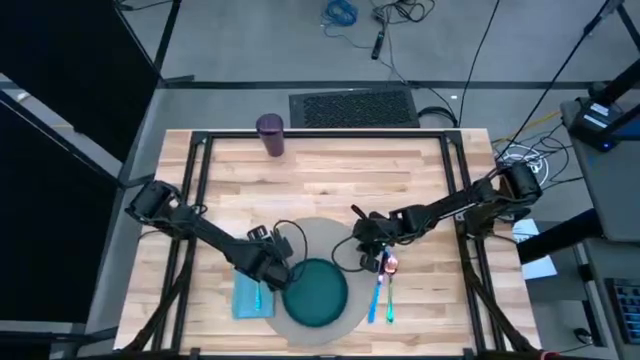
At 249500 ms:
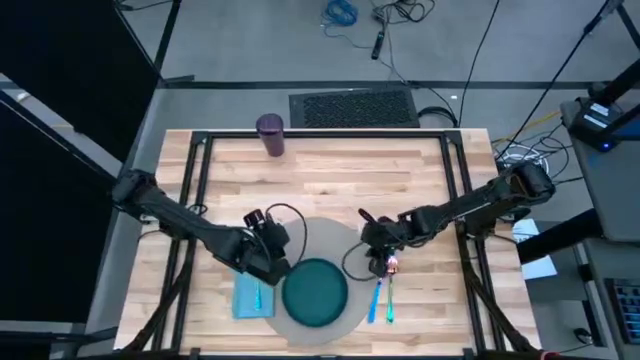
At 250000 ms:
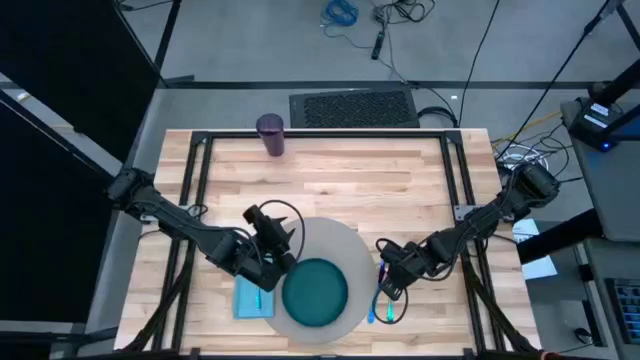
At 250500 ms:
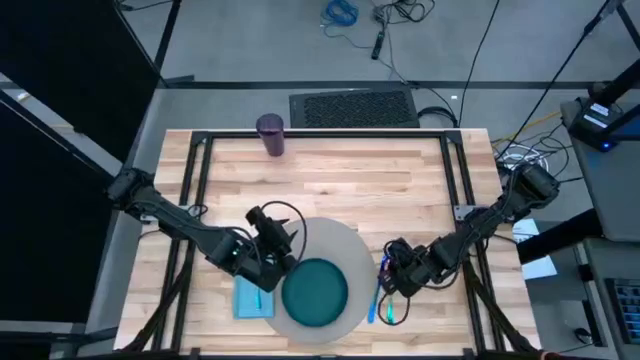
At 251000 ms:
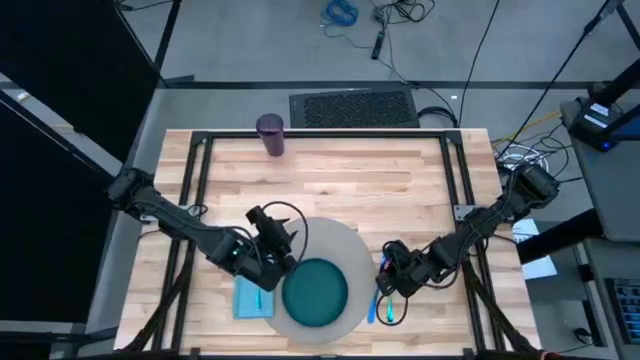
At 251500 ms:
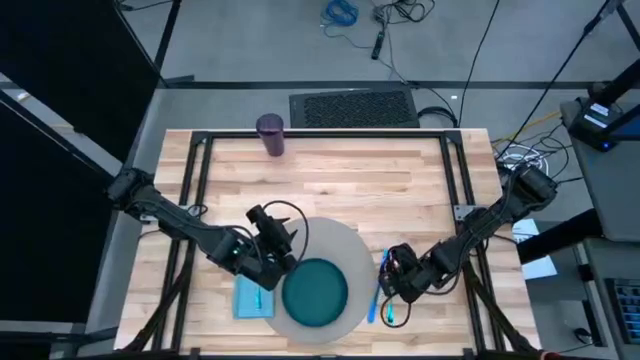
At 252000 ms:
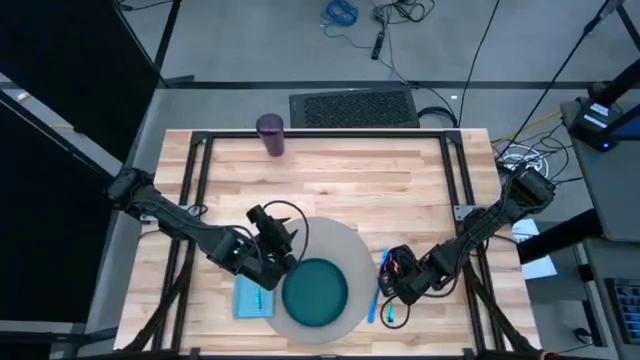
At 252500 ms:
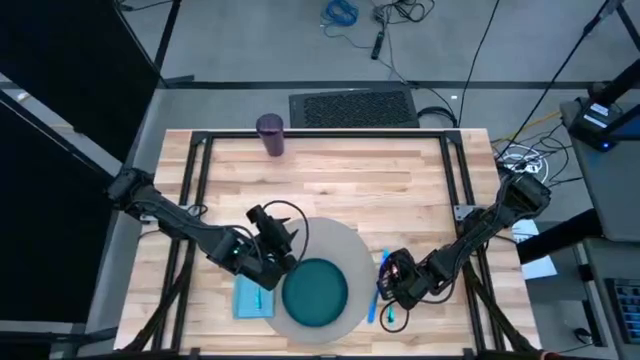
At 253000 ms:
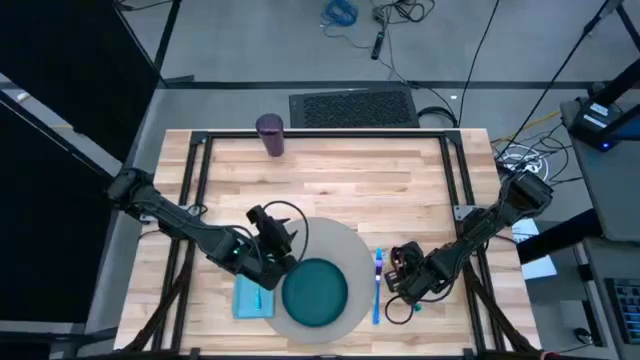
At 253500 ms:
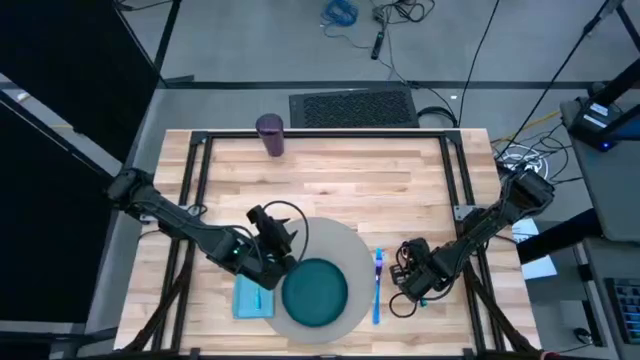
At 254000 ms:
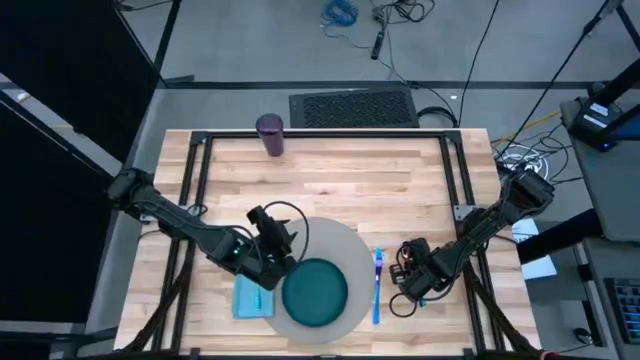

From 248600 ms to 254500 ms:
Task: Set table place
Adjust the blue spoon

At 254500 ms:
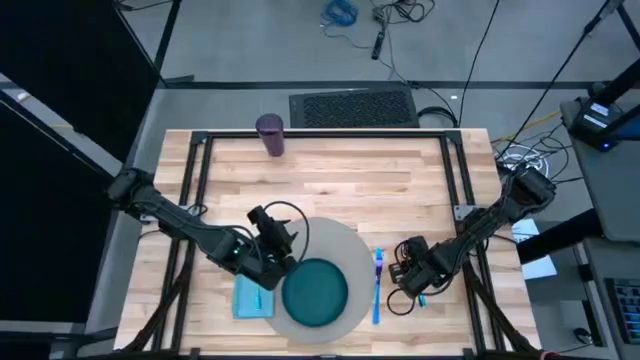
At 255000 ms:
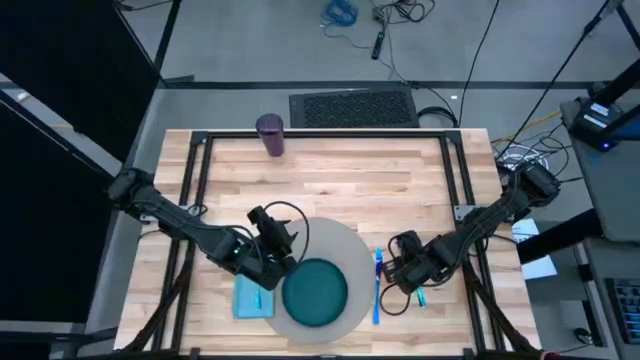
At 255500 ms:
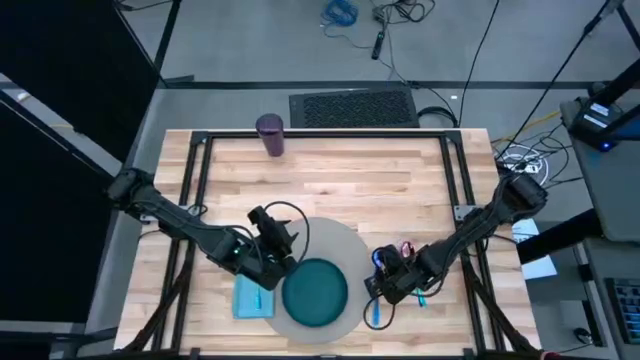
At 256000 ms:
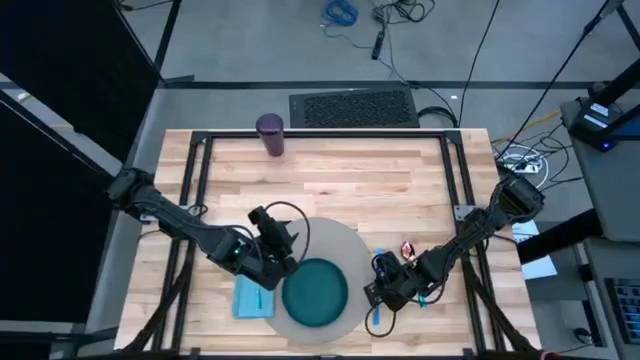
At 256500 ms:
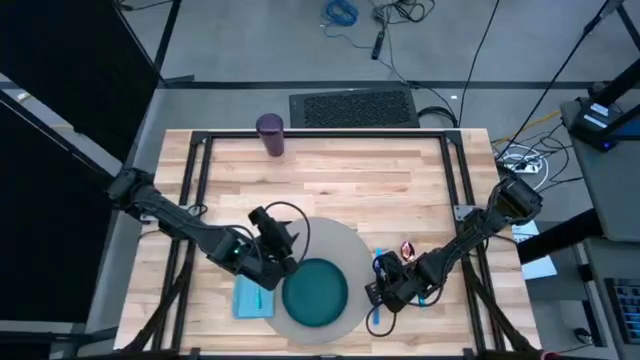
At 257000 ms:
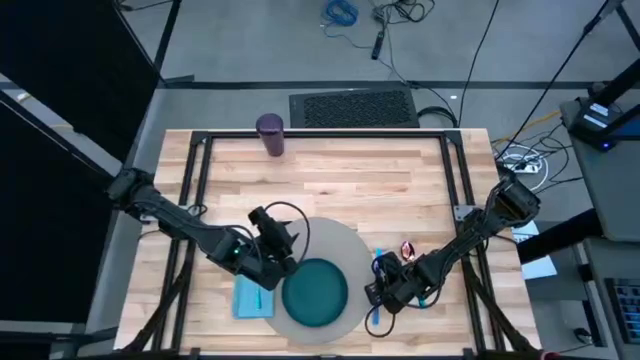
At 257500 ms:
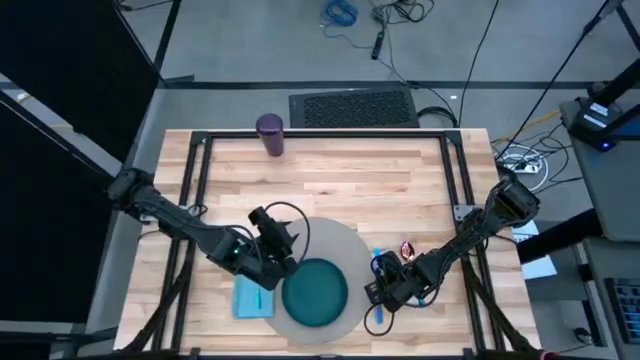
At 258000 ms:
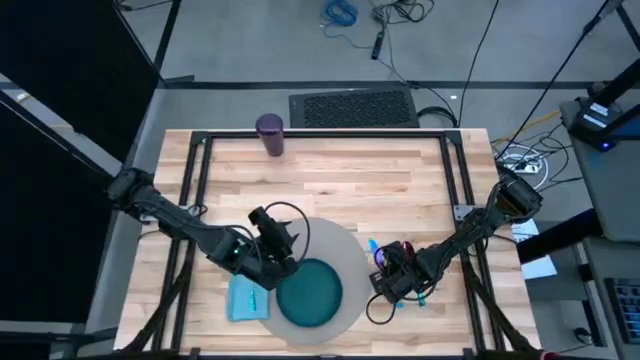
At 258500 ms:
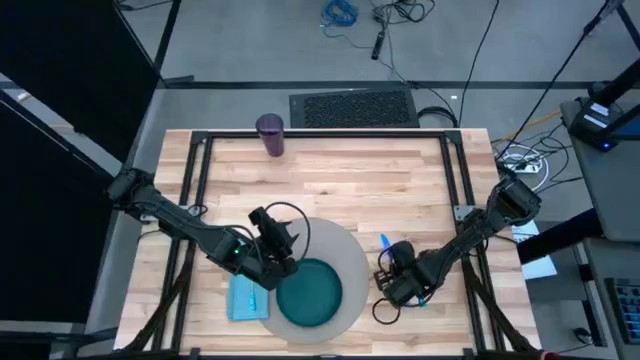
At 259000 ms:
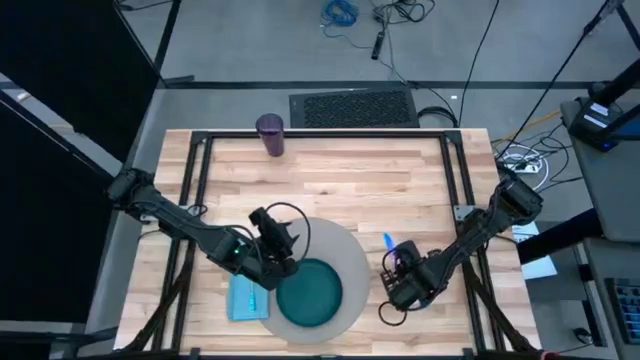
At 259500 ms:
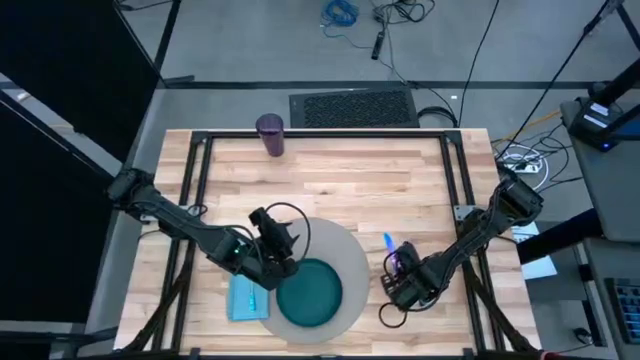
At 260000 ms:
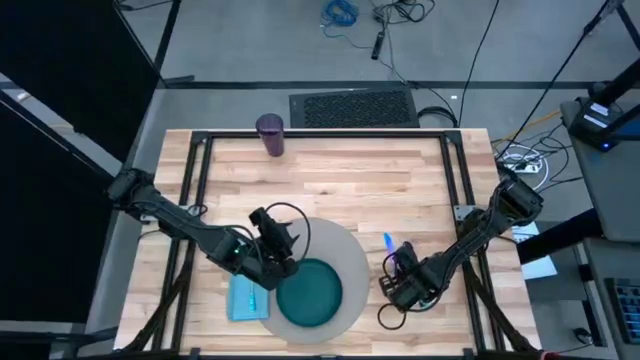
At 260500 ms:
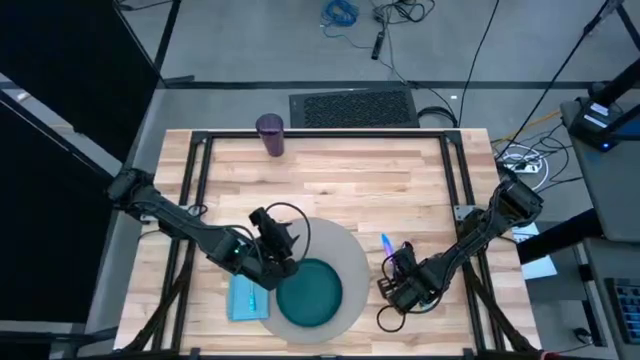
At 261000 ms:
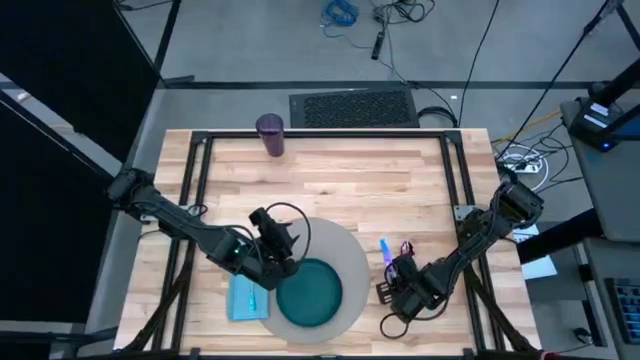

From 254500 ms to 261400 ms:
Adjust the blue table knife

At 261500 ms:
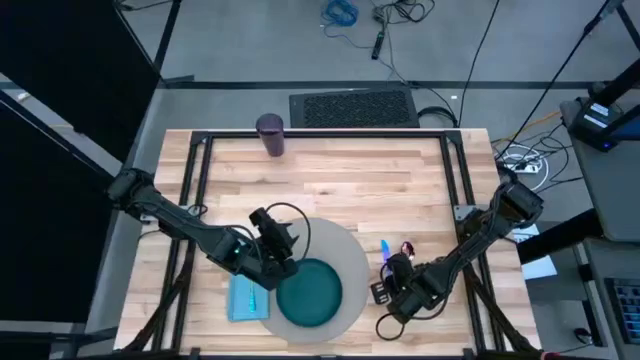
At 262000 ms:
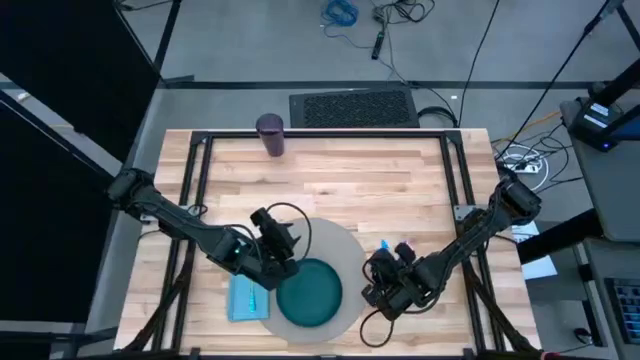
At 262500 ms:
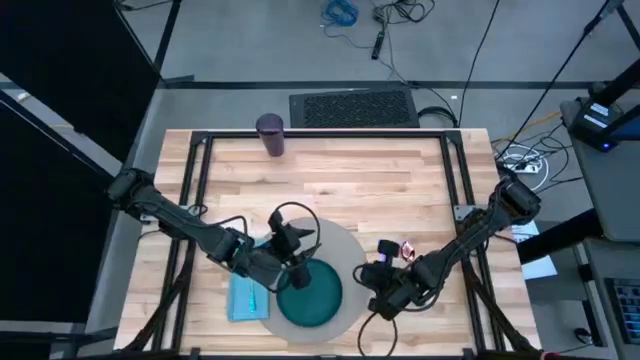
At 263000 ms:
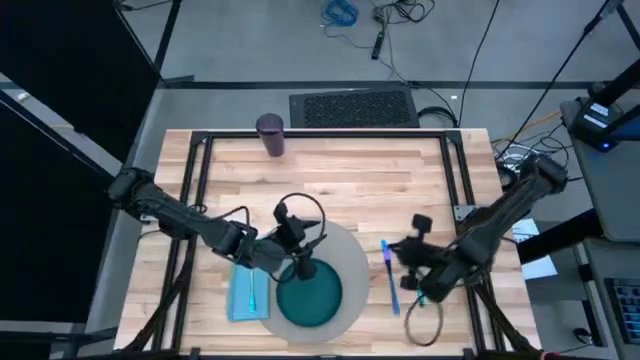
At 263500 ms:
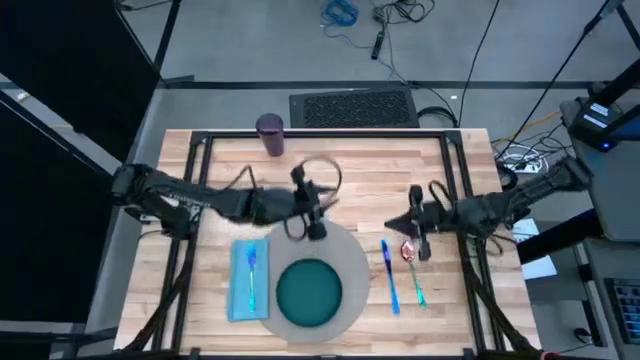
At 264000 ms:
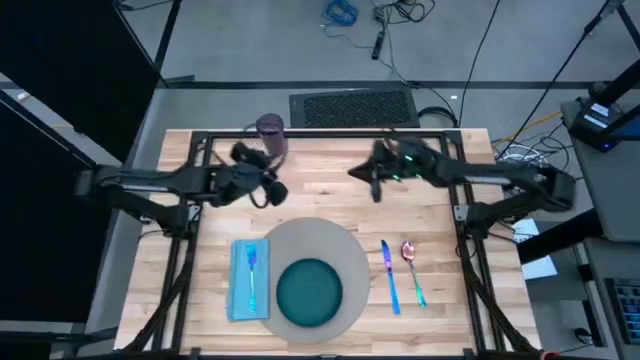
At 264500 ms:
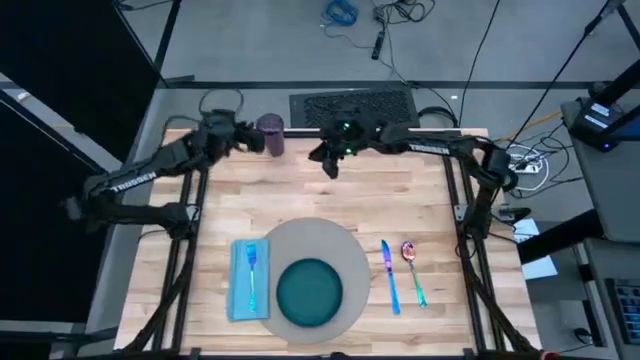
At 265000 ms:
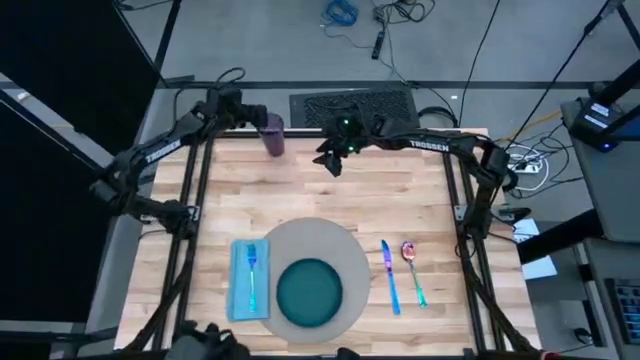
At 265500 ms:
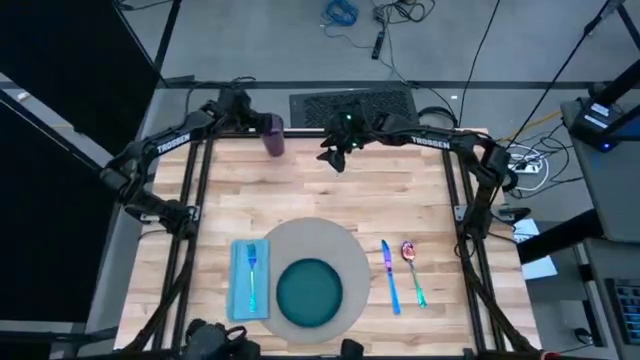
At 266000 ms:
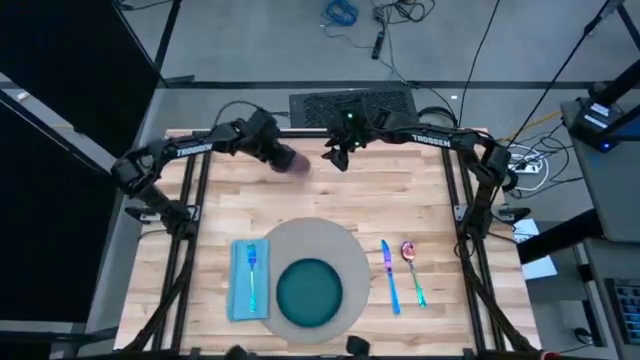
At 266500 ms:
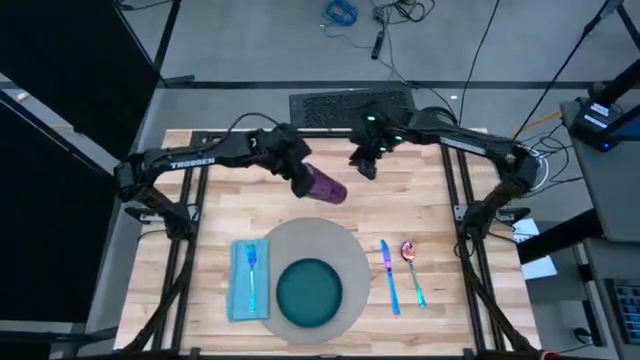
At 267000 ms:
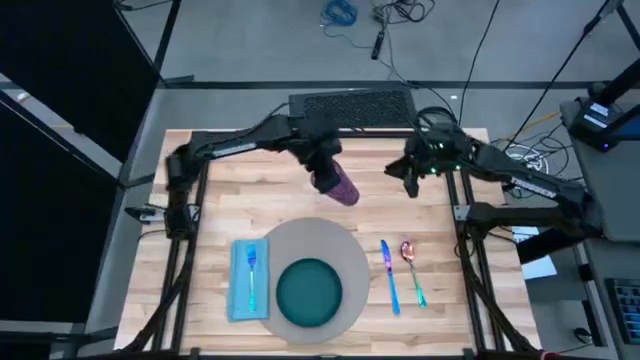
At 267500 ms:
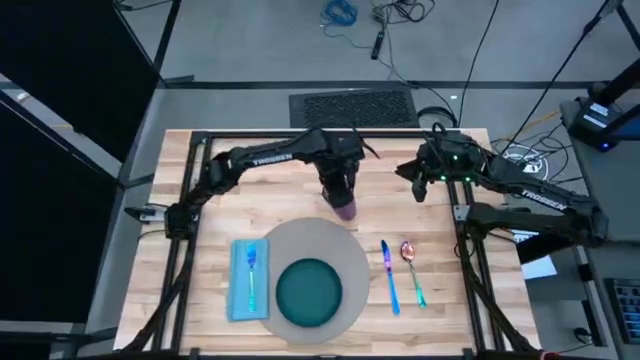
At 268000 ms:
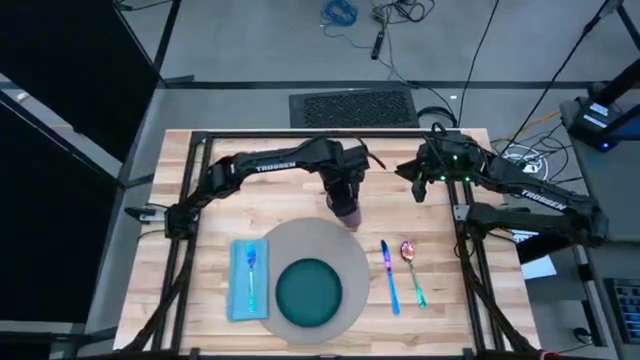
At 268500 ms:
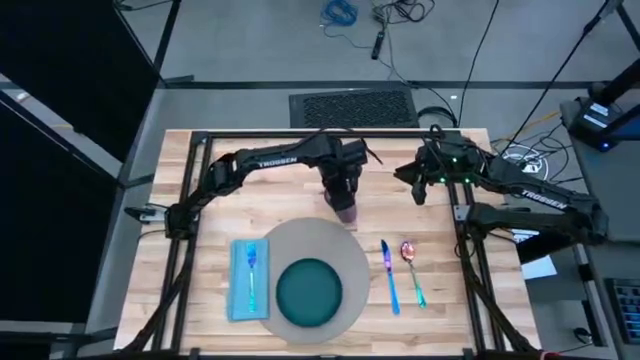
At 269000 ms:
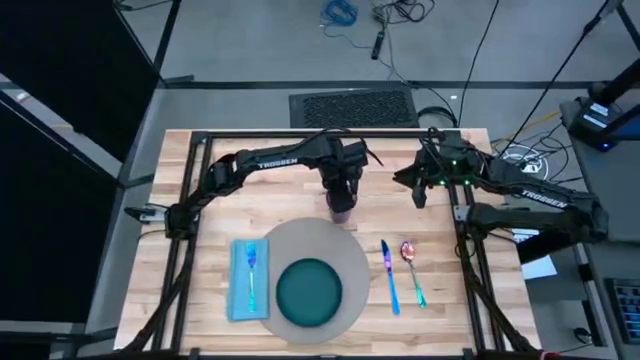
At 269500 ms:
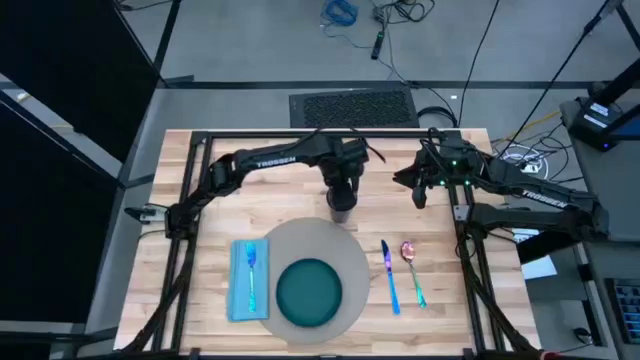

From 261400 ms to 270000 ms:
Put the violet cup to the top of the gray placemat
